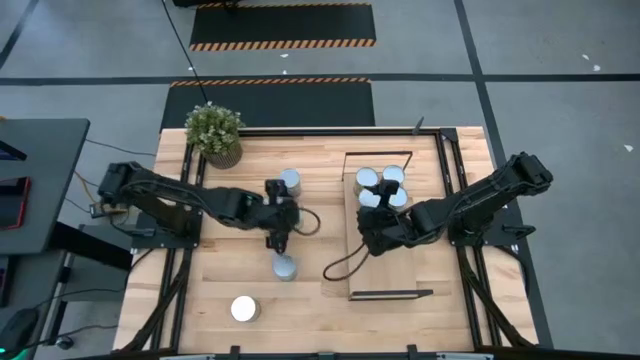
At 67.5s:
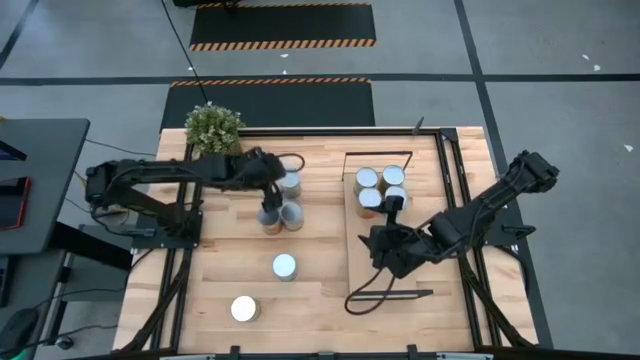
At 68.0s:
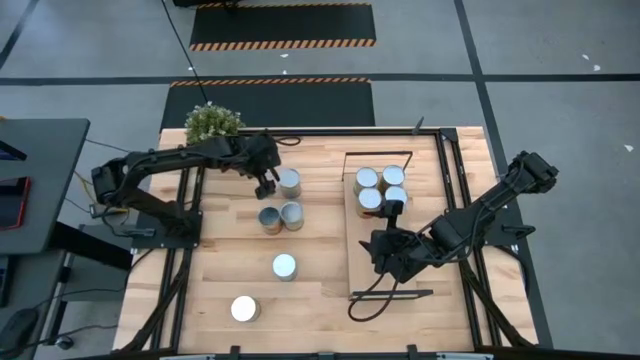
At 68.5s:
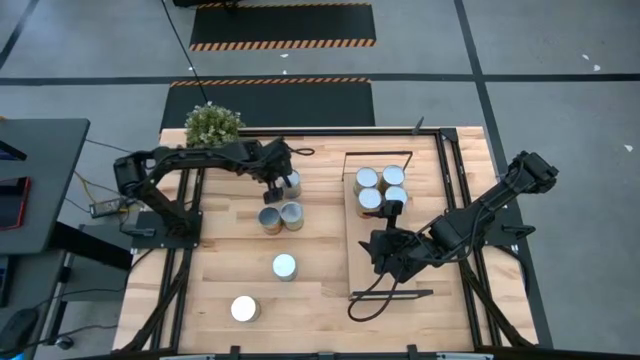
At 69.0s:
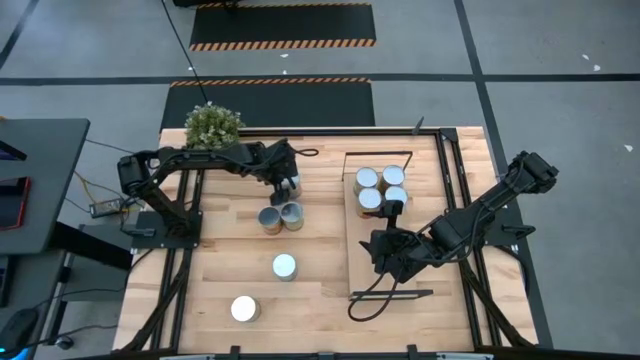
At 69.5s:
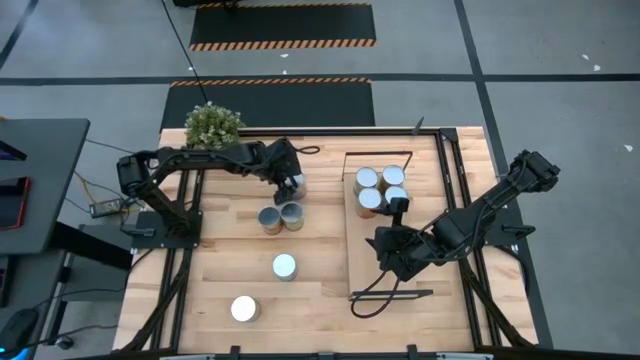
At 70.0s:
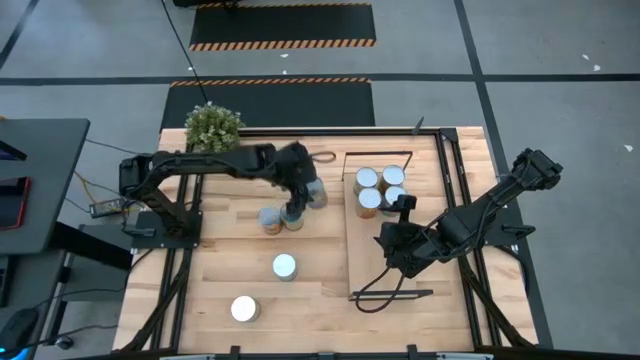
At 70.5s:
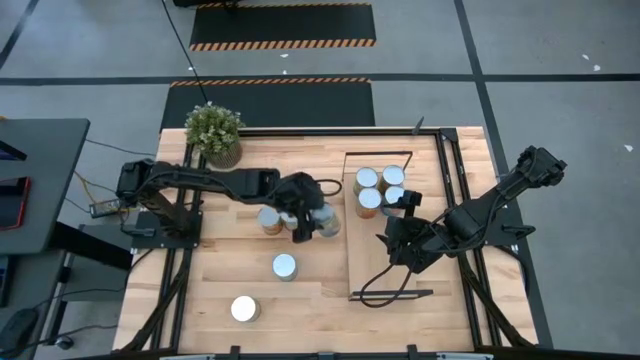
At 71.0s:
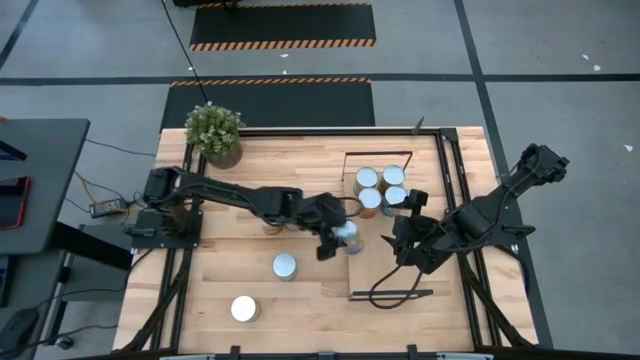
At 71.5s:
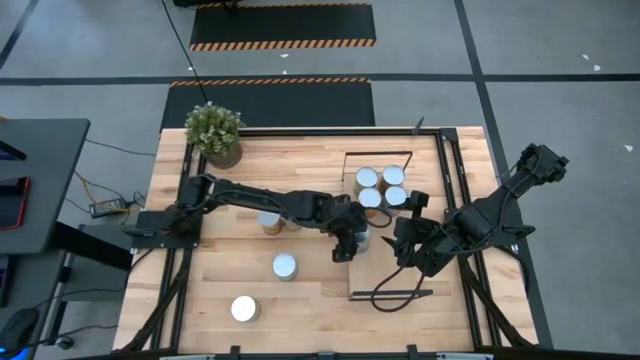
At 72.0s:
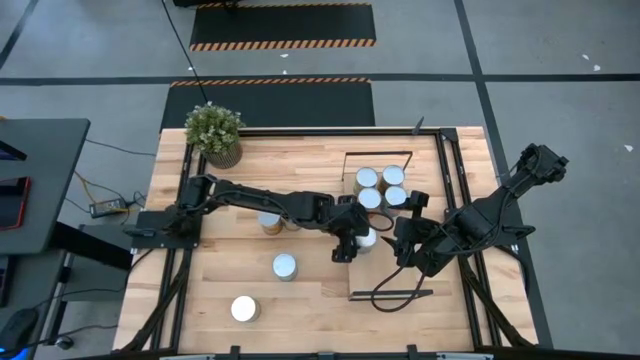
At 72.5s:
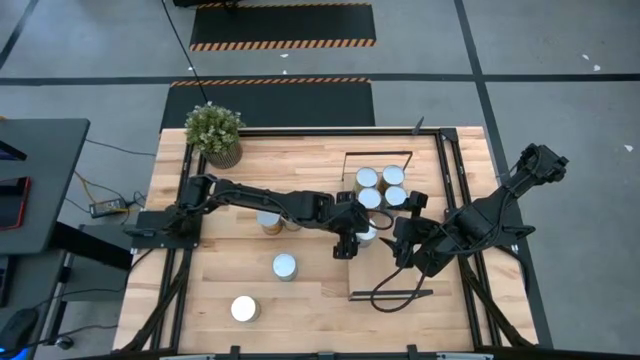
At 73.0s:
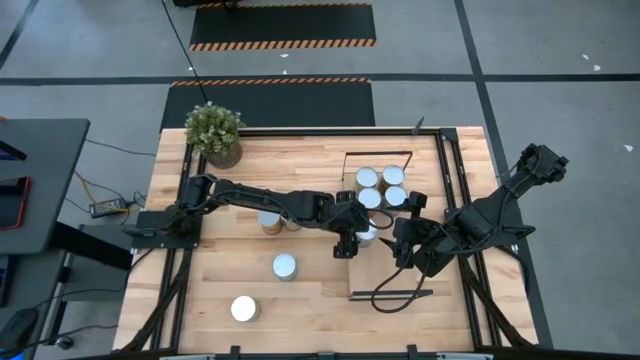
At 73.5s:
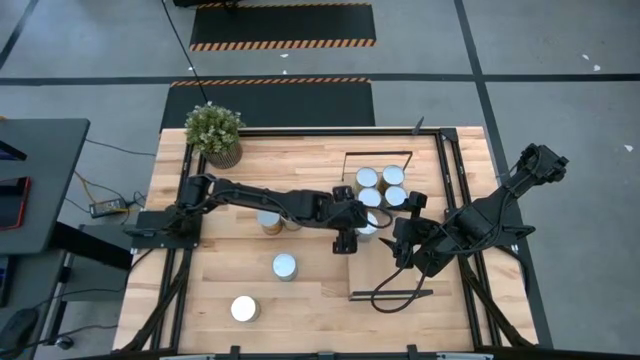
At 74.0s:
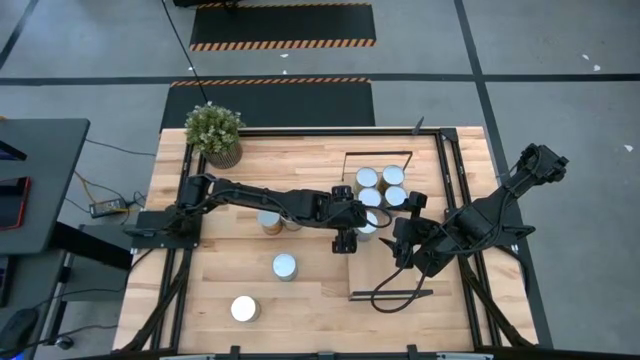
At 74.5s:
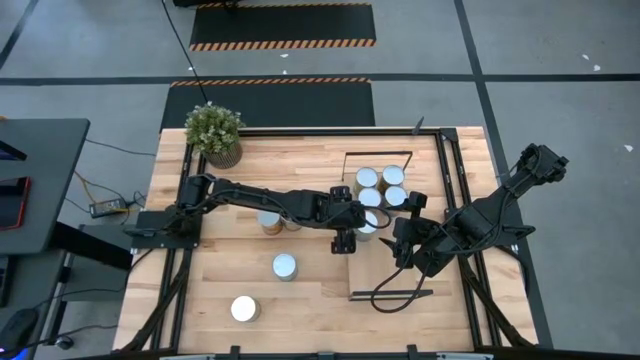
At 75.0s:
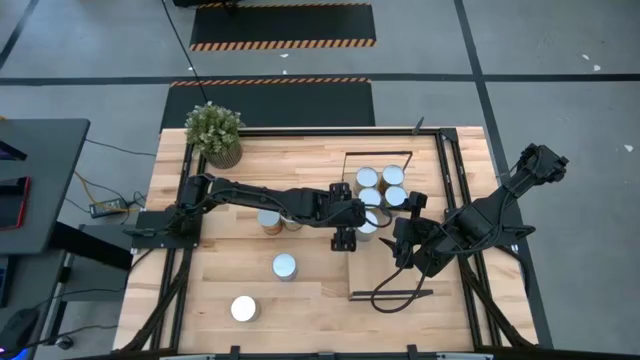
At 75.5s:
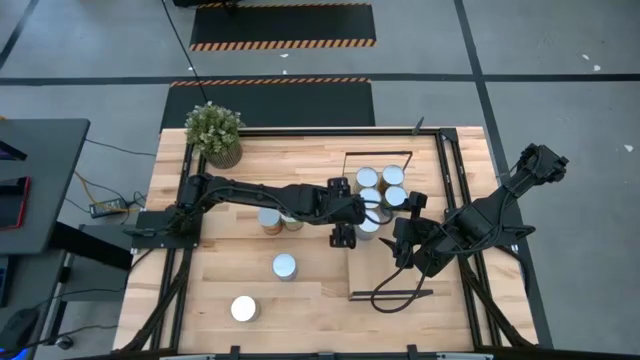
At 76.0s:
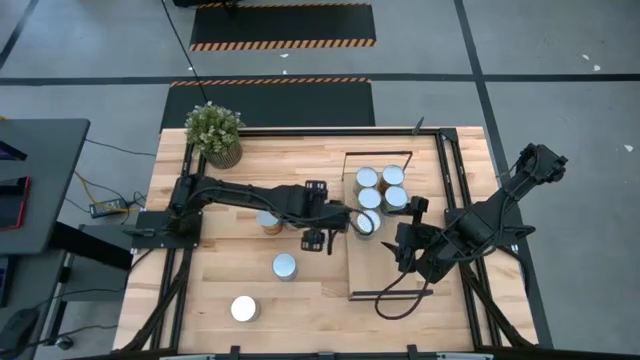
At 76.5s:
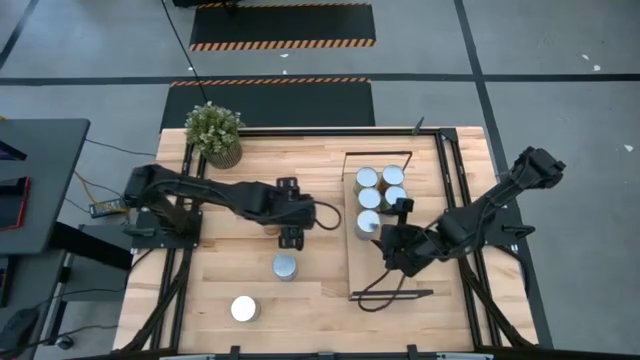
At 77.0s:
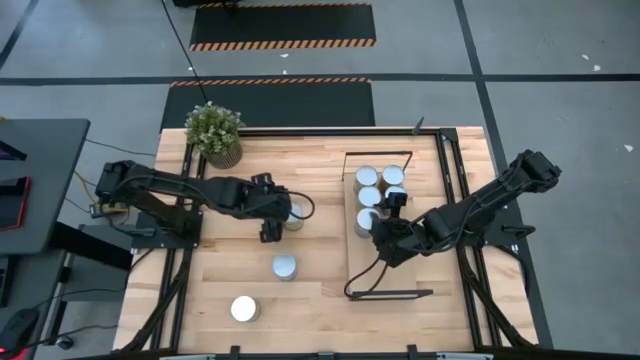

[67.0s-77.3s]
Task: Pick and place cans onto a shelf
Put the canned peaches on the shelf

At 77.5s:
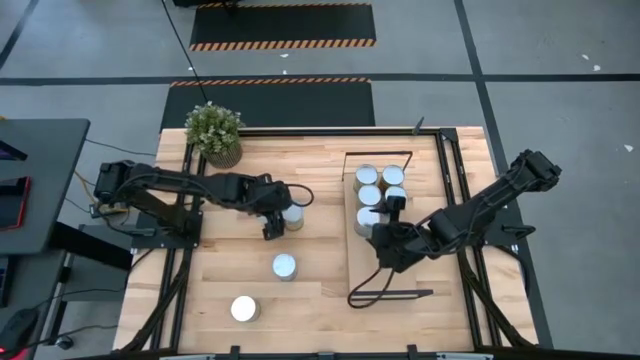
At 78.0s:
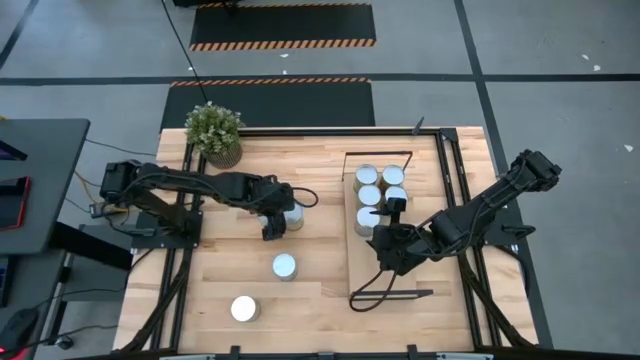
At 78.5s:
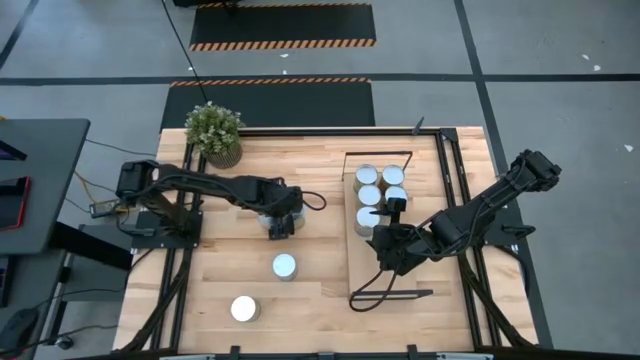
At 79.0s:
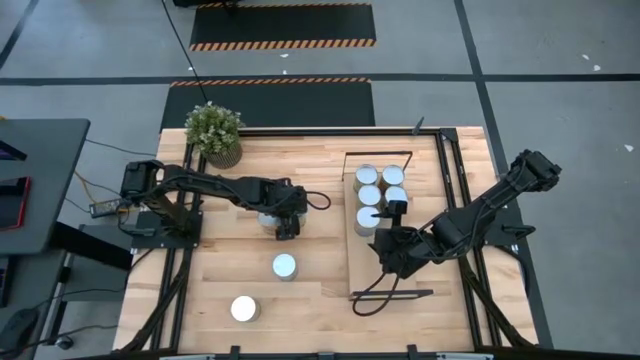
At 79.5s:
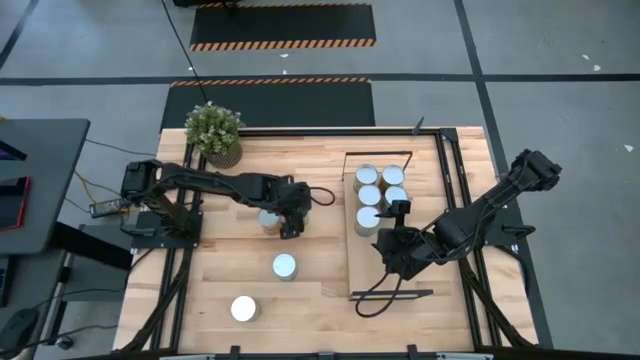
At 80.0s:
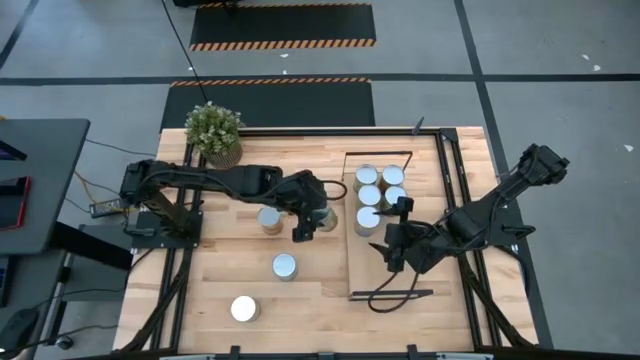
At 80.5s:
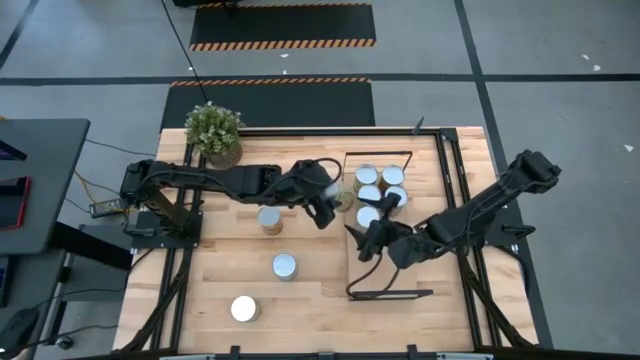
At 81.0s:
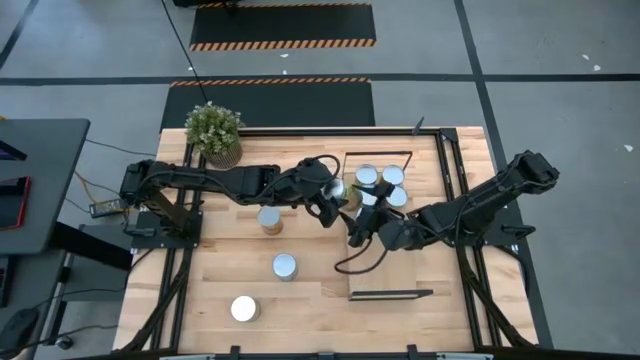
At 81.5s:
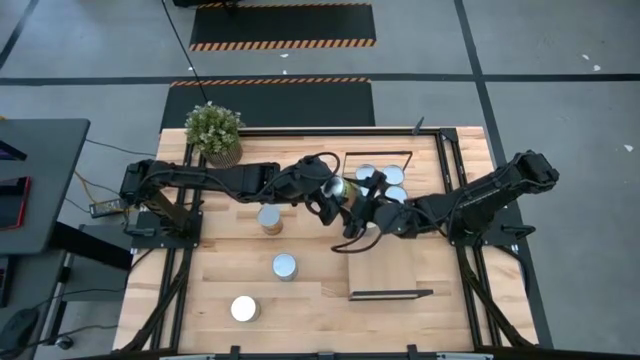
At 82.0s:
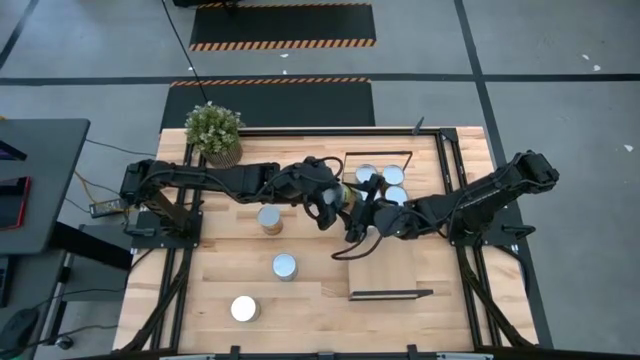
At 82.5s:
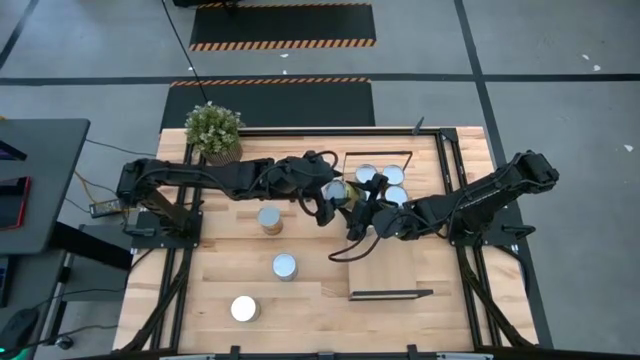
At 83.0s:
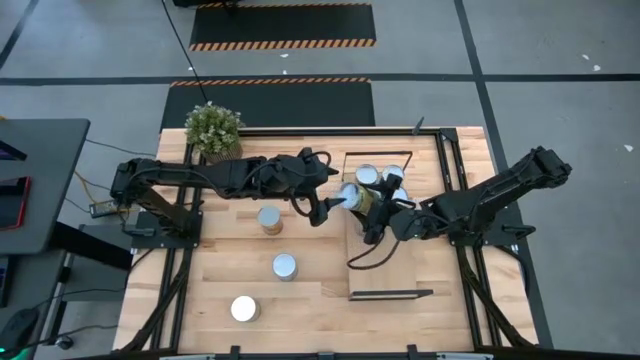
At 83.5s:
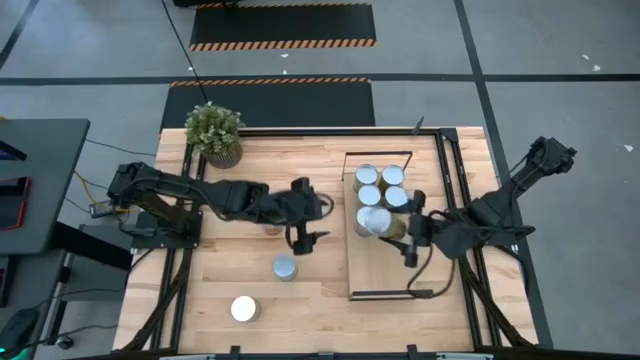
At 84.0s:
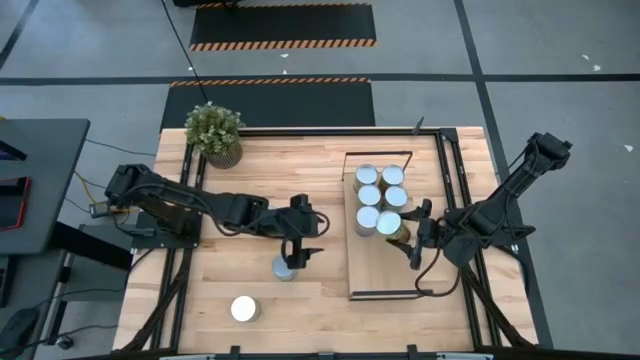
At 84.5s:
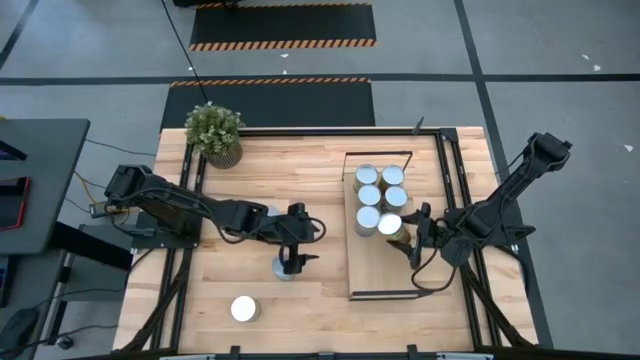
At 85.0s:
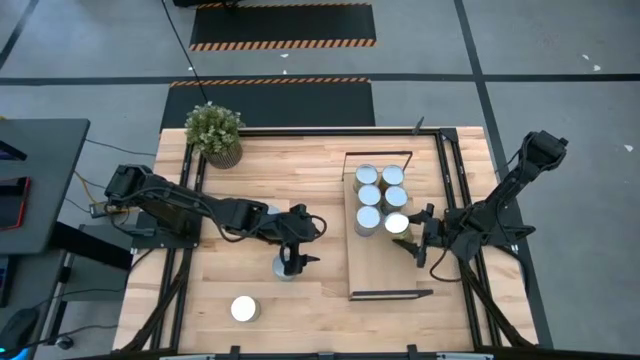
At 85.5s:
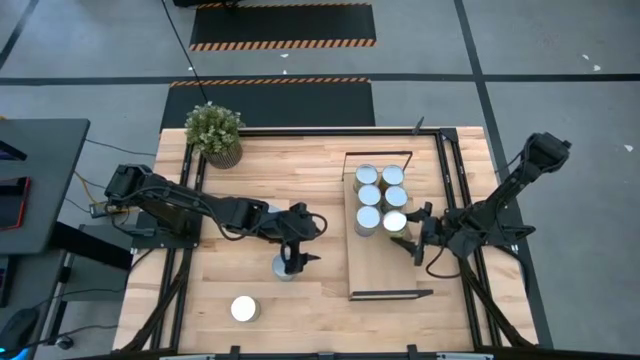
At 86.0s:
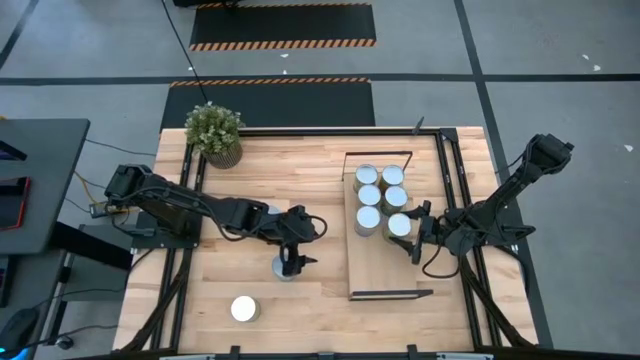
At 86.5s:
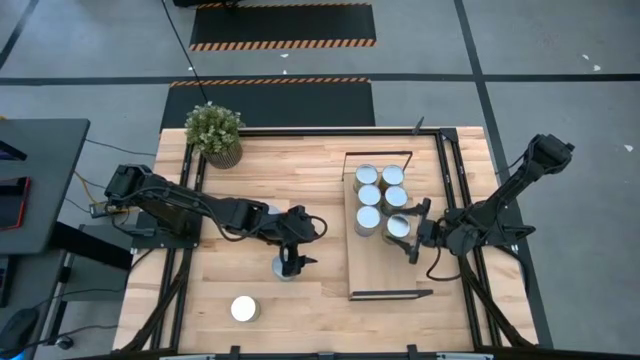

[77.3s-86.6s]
Put the top canned oranges on the shelf

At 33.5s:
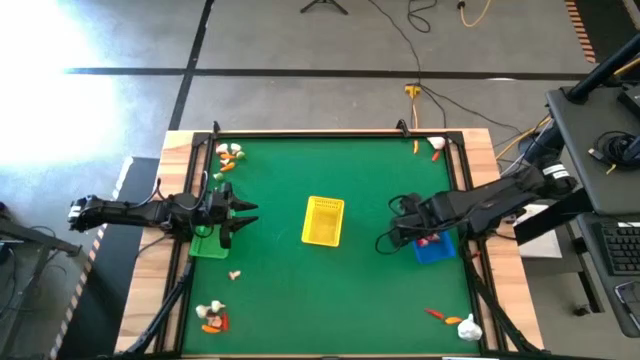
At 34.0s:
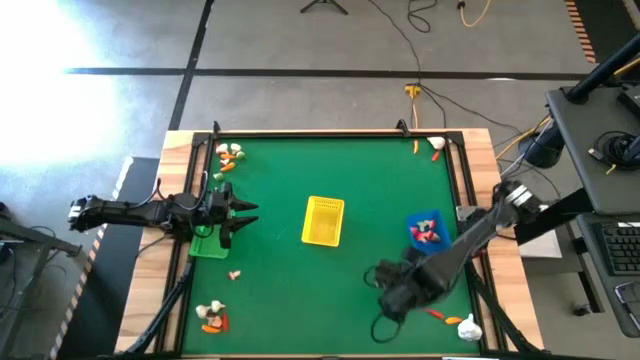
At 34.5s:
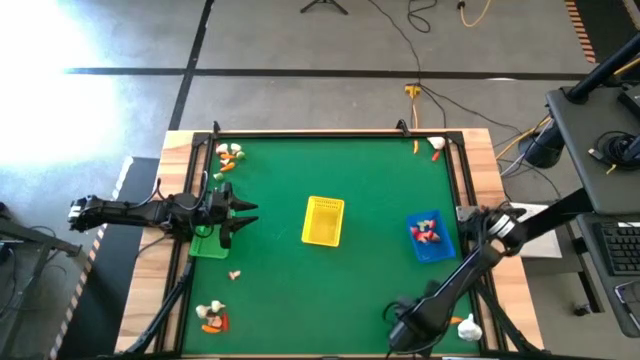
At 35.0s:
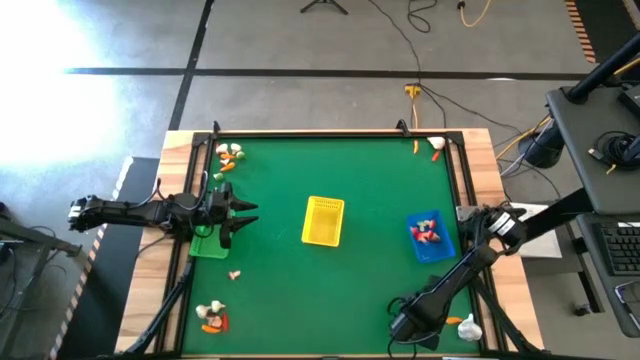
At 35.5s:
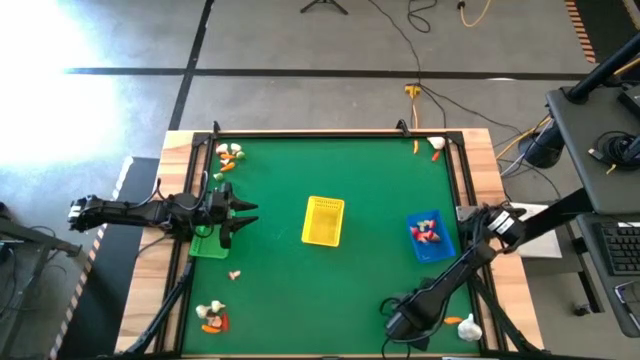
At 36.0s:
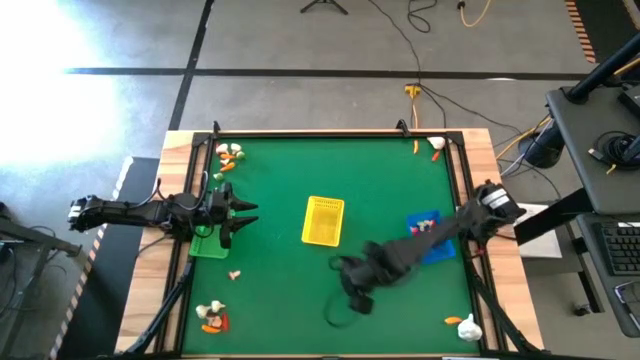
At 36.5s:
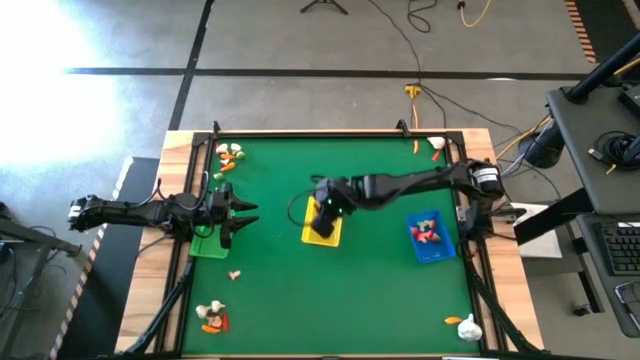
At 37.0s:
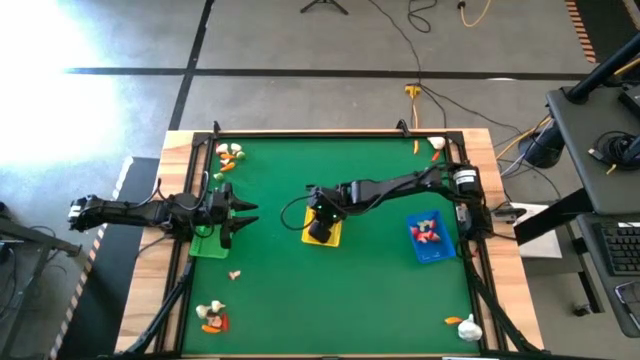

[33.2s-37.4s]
Task: Sort produce into baskets
Put the red chili pepper into the yellow bin
